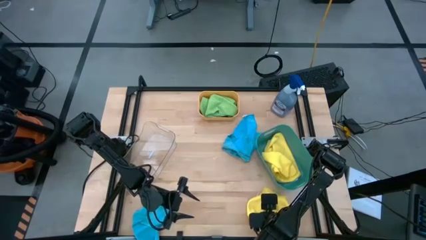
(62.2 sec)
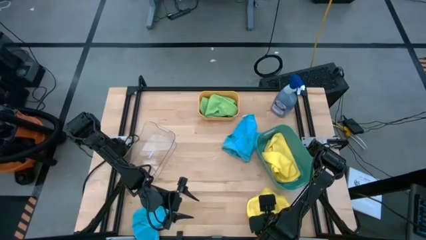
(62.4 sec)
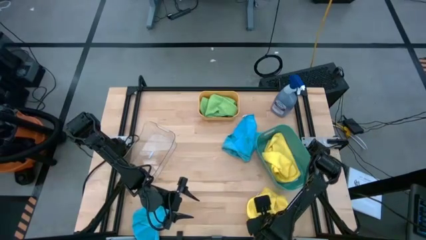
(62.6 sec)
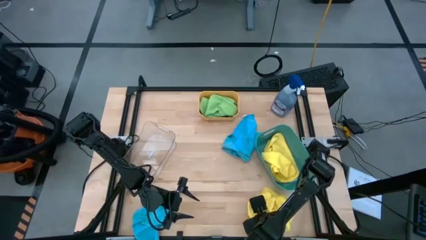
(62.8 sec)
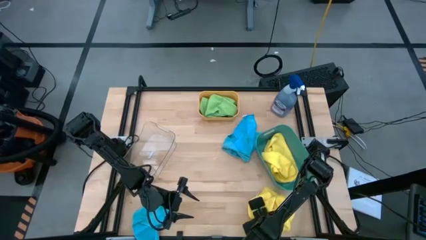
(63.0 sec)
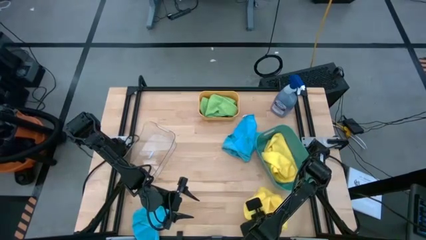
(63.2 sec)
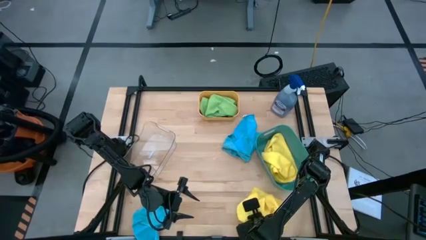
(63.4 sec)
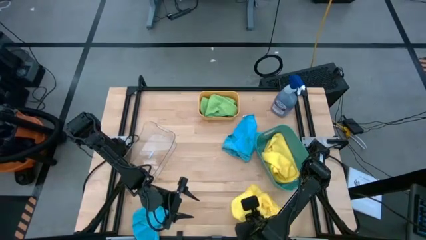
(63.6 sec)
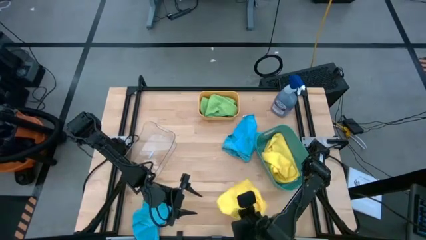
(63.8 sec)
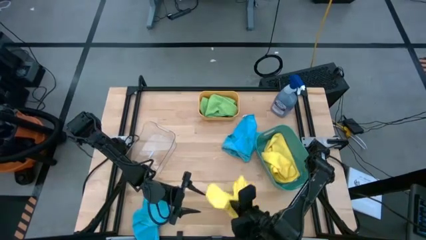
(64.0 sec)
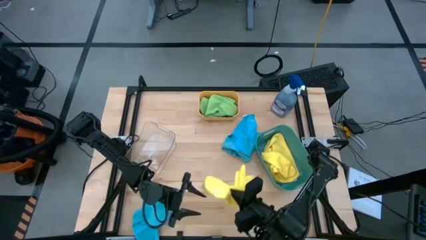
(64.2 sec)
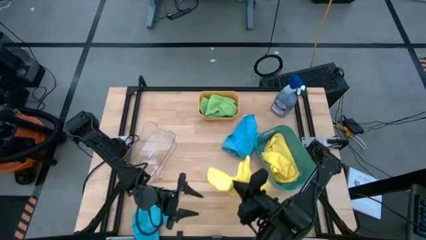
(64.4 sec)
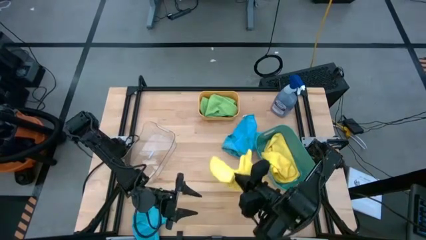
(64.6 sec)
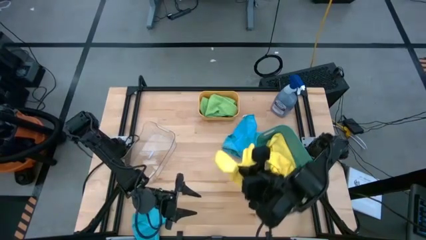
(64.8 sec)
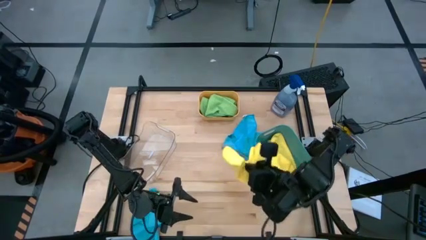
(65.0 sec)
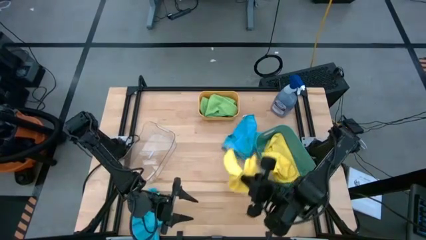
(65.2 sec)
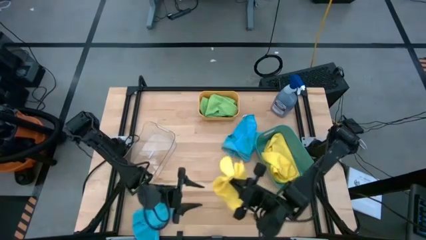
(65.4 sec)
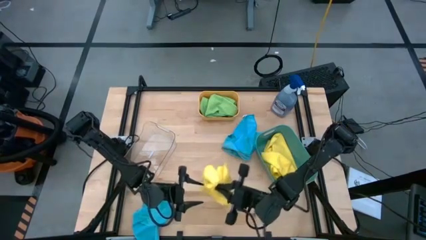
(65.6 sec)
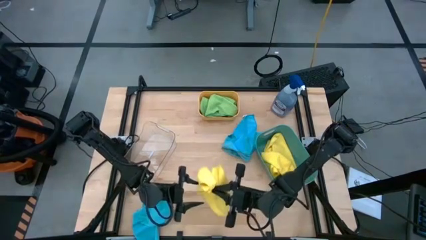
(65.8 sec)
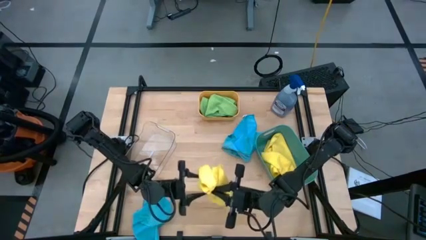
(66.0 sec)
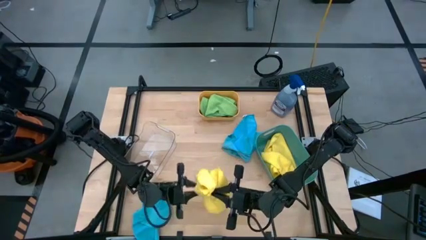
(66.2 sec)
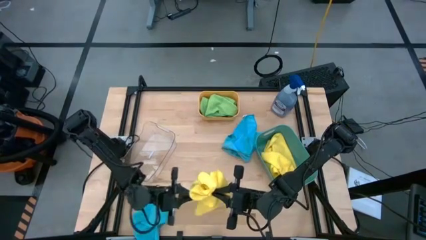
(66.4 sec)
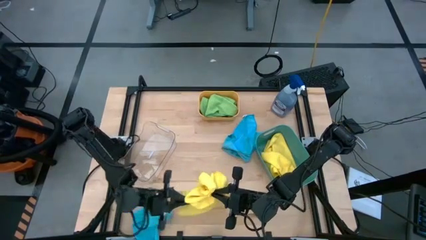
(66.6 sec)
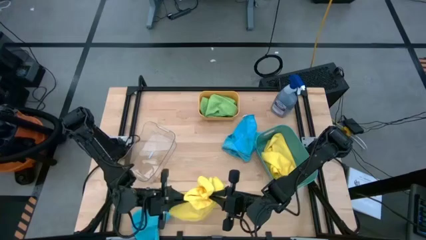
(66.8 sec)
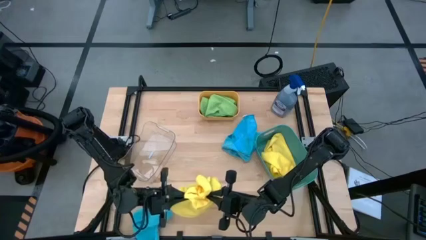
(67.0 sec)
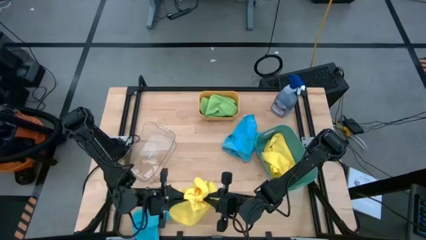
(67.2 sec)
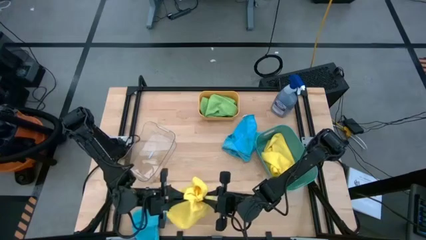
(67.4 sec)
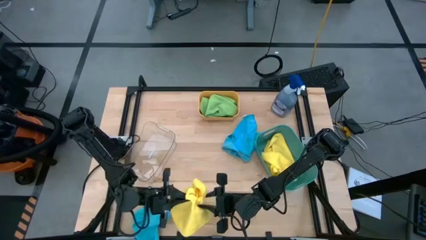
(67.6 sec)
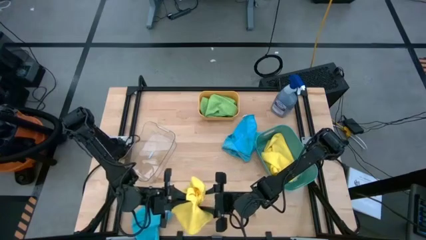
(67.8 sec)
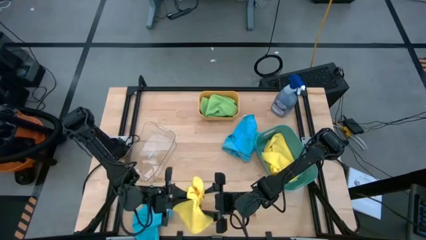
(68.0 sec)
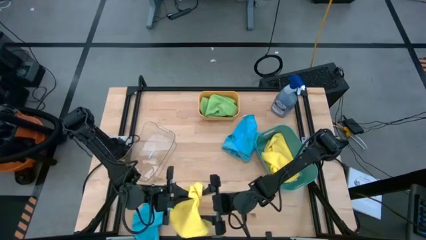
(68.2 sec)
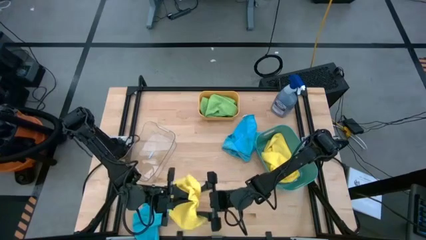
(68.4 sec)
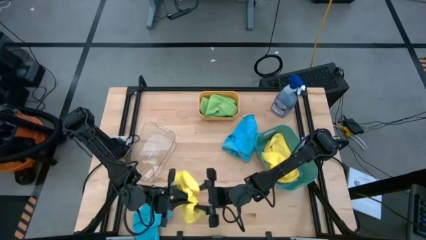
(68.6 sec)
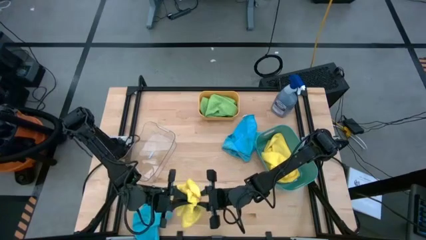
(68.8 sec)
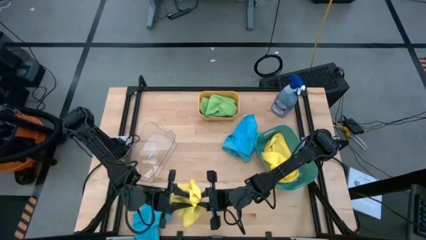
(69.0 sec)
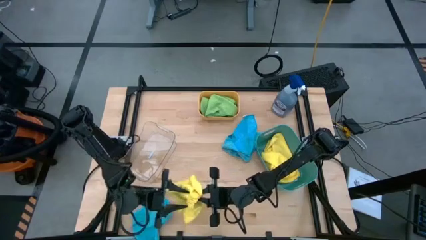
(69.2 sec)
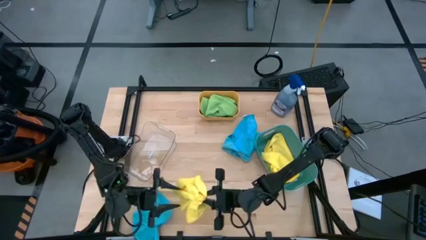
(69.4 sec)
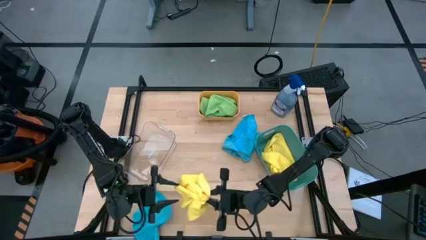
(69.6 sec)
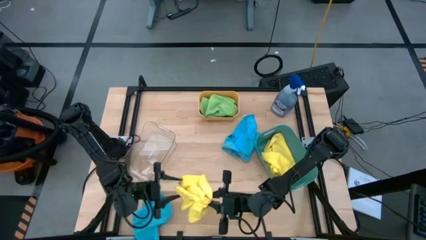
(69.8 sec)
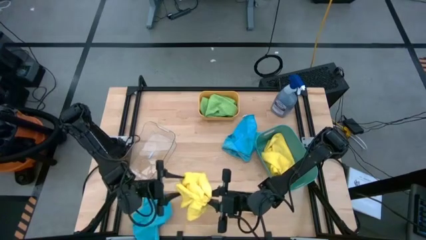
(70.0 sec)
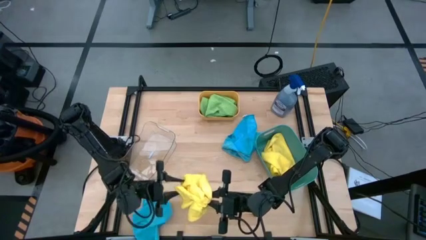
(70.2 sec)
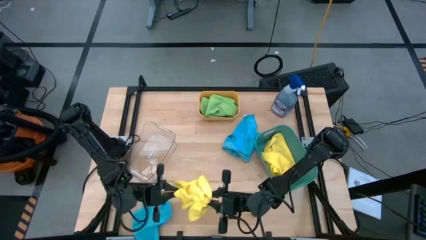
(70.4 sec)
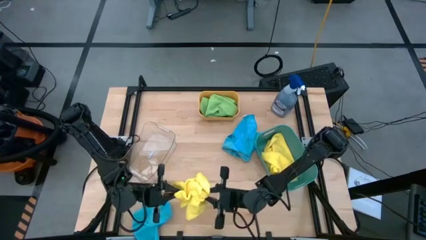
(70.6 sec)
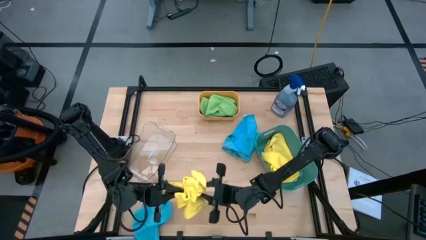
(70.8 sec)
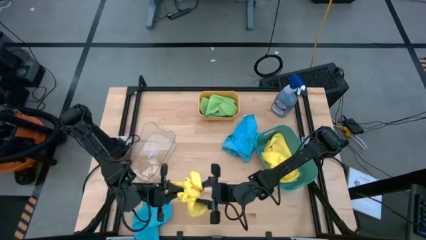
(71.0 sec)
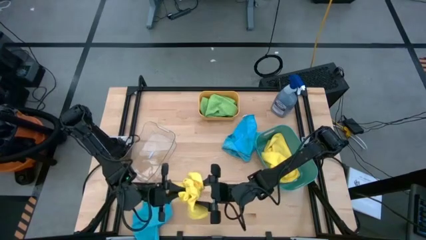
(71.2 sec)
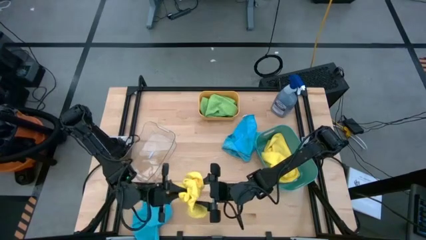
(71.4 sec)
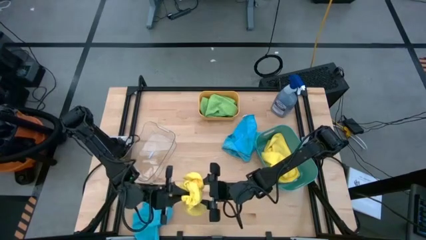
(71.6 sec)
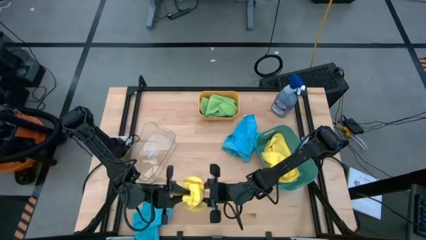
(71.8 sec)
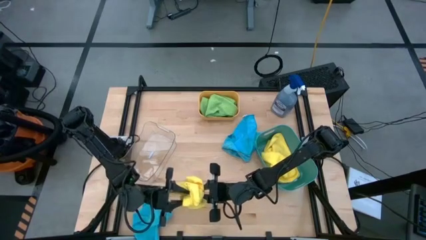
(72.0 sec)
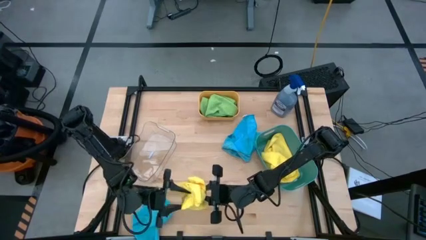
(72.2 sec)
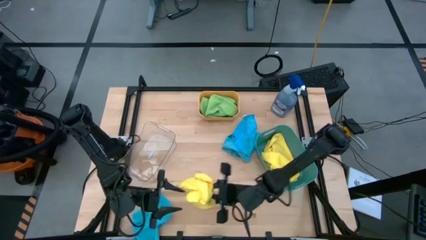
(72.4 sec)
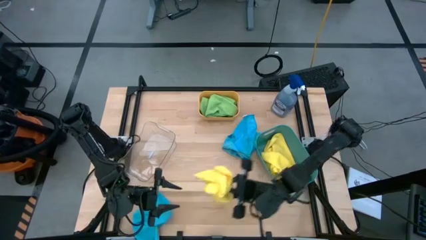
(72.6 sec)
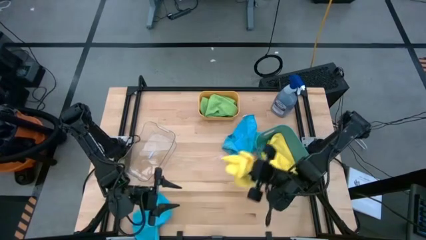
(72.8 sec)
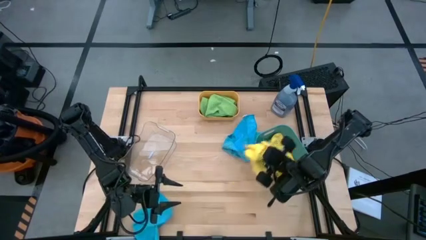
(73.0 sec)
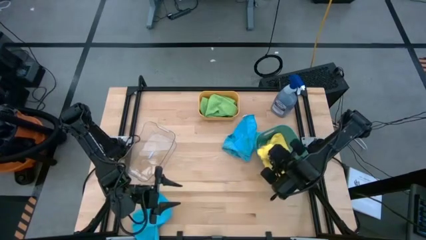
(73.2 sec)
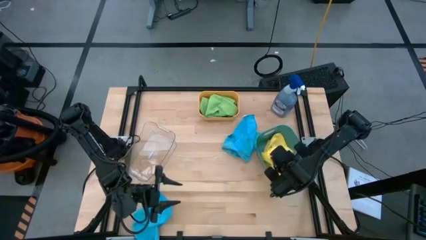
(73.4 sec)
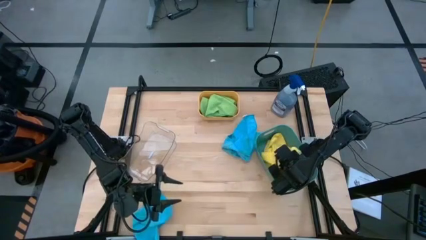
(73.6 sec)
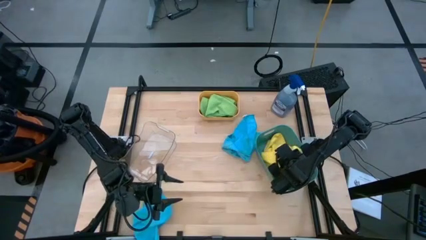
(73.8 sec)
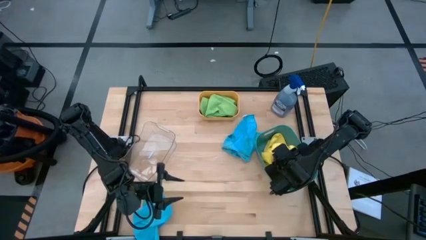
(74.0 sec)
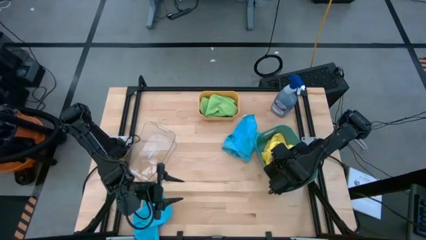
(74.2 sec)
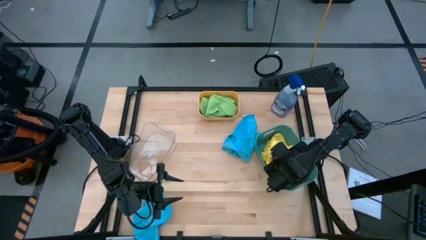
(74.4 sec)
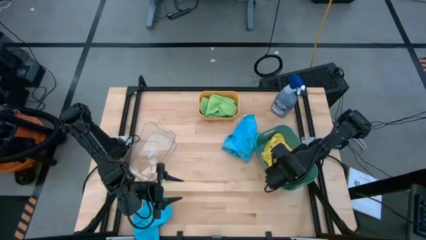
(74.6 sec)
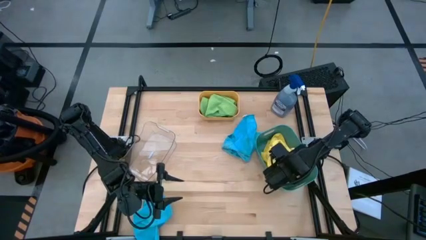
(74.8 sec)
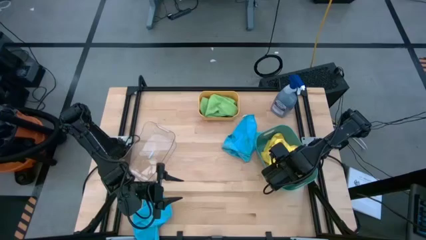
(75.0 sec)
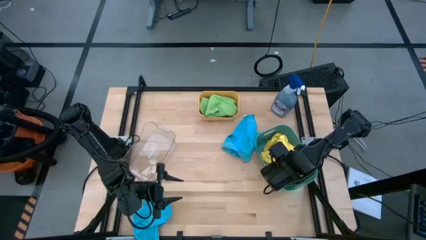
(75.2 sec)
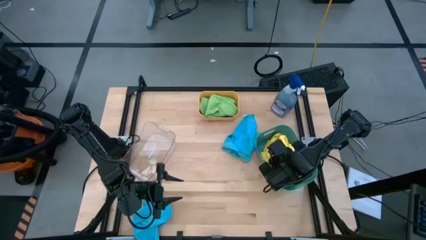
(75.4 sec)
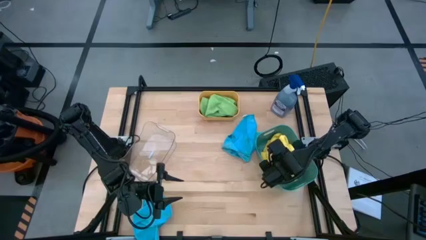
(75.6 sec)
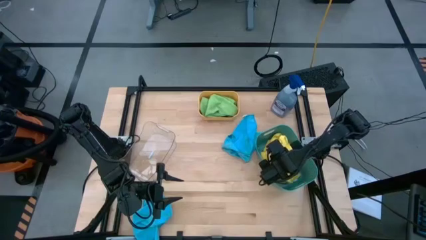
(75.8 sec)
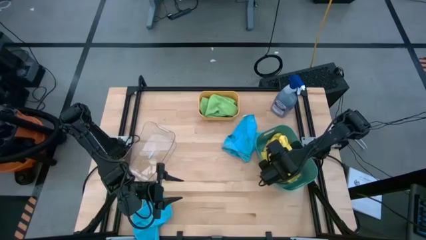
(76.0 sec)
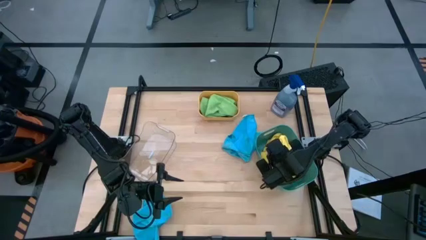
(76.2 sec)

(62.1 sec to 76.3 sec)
Task: Sort microfiber towel by color & place in baskets
Put the yellow microfiber cloth into the green bin
